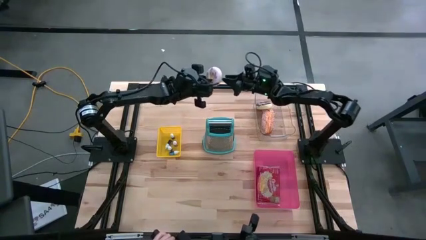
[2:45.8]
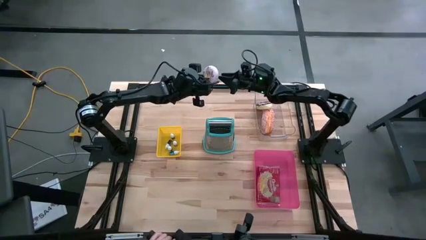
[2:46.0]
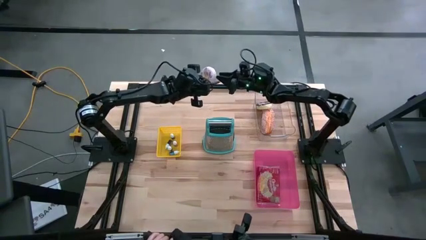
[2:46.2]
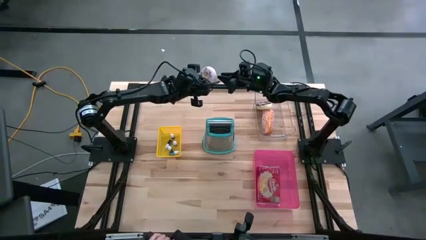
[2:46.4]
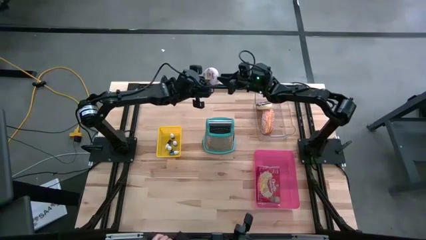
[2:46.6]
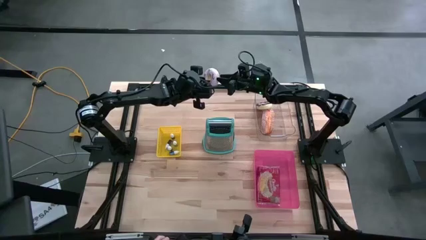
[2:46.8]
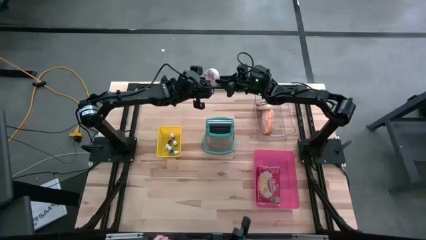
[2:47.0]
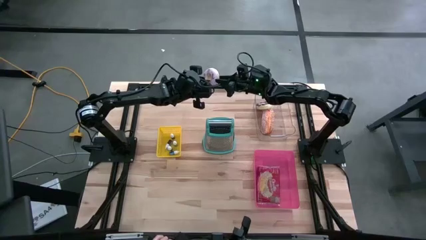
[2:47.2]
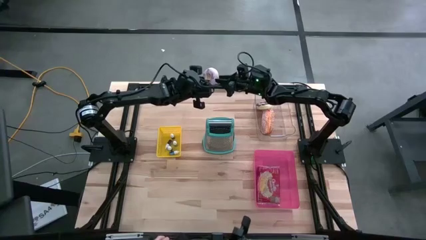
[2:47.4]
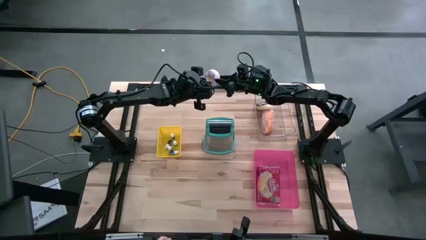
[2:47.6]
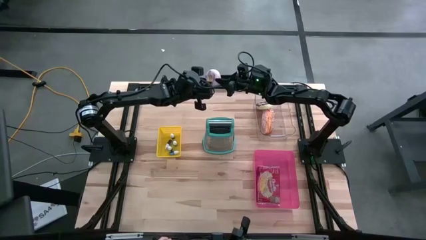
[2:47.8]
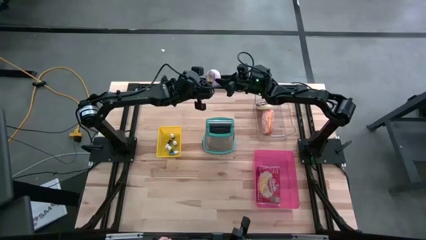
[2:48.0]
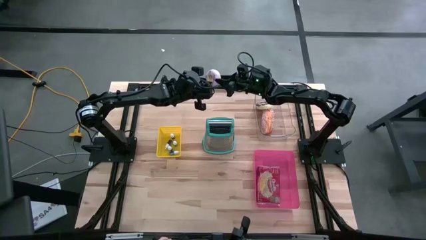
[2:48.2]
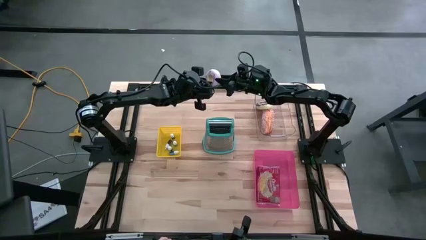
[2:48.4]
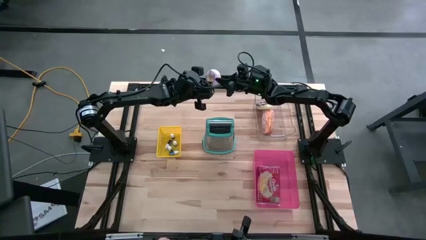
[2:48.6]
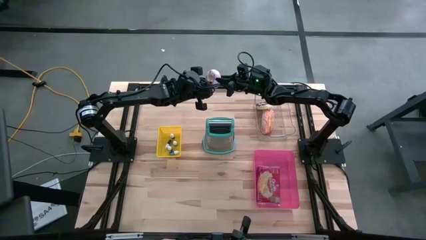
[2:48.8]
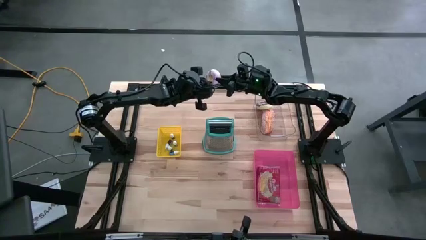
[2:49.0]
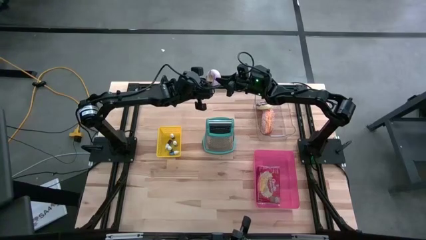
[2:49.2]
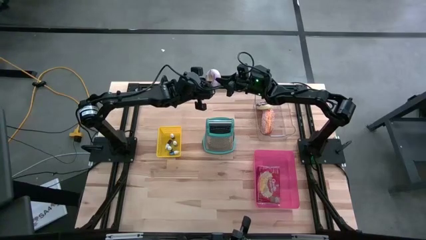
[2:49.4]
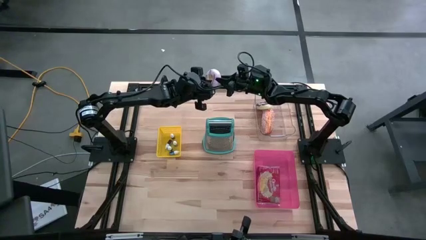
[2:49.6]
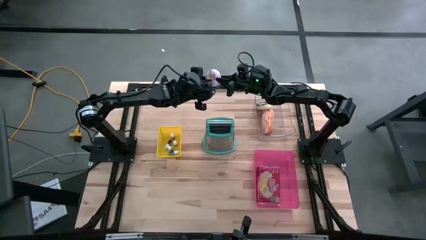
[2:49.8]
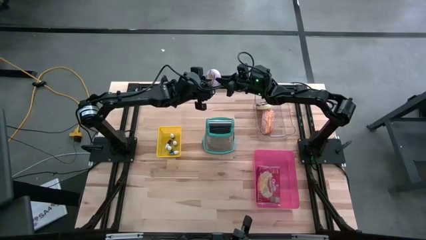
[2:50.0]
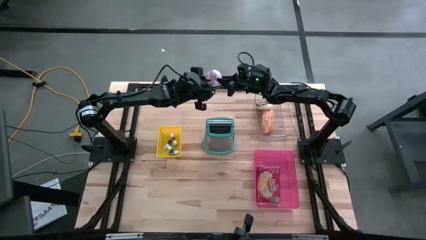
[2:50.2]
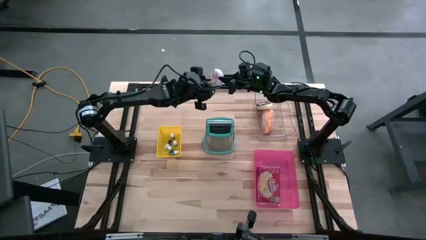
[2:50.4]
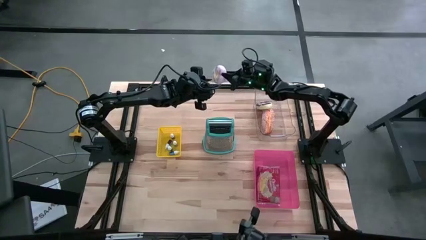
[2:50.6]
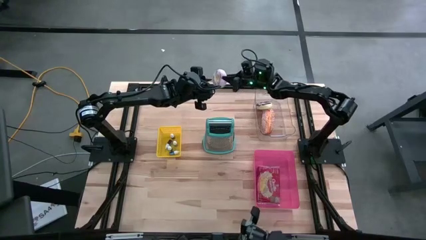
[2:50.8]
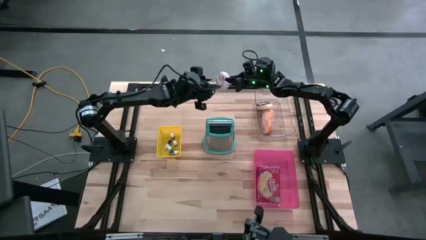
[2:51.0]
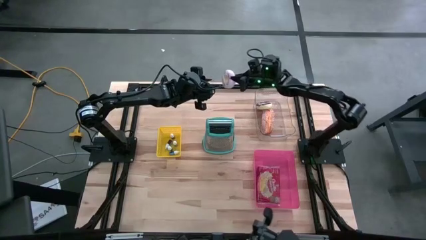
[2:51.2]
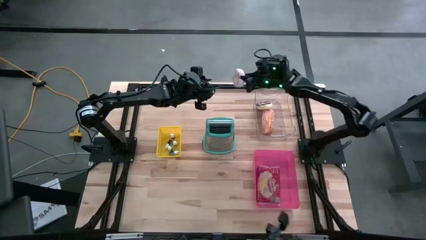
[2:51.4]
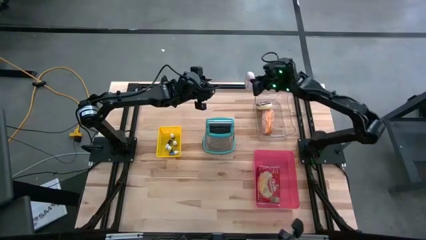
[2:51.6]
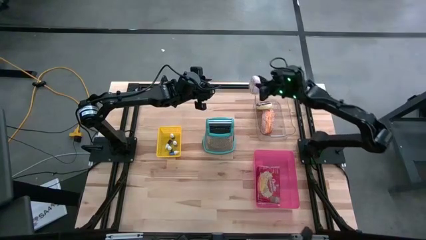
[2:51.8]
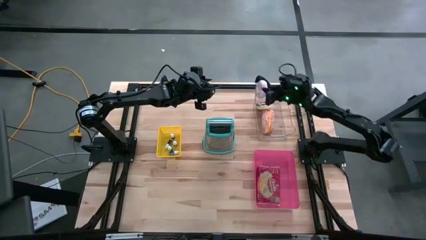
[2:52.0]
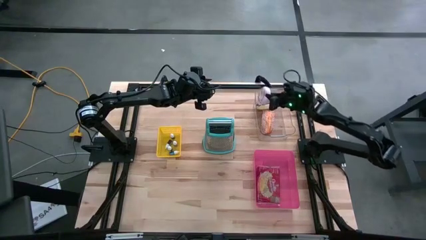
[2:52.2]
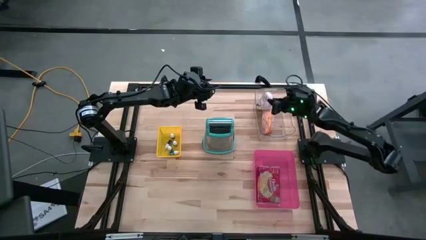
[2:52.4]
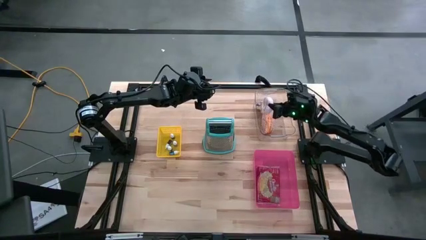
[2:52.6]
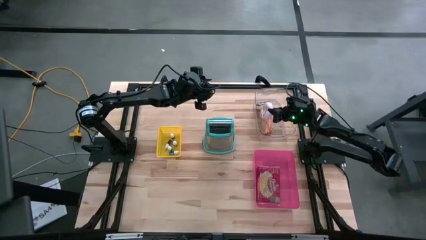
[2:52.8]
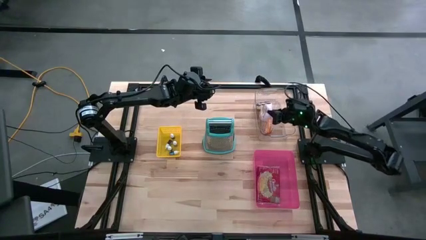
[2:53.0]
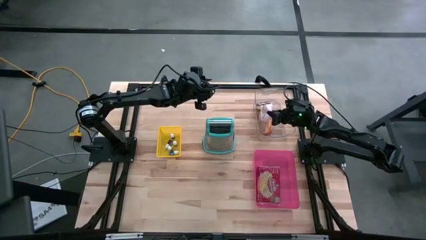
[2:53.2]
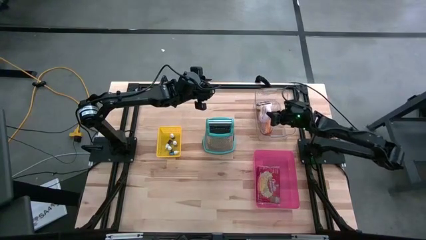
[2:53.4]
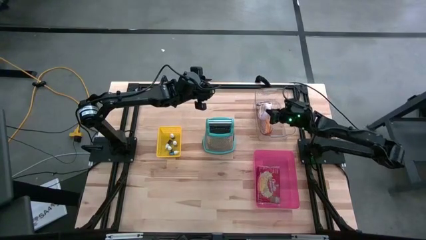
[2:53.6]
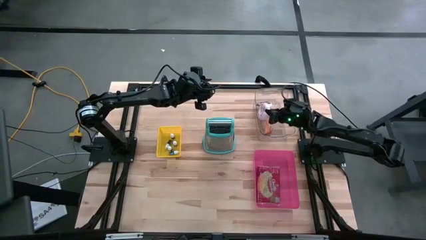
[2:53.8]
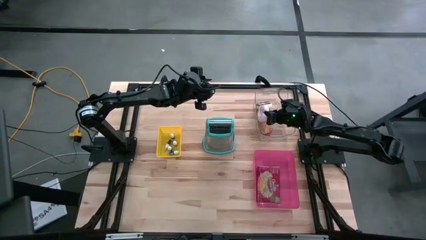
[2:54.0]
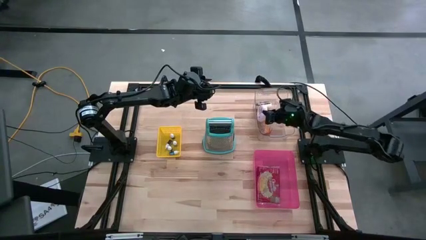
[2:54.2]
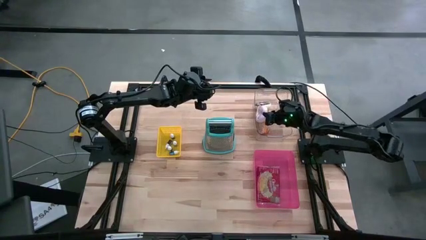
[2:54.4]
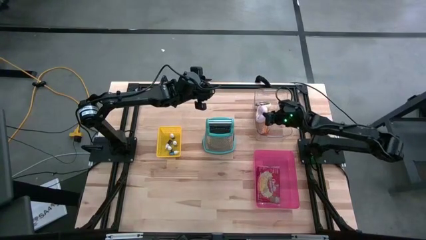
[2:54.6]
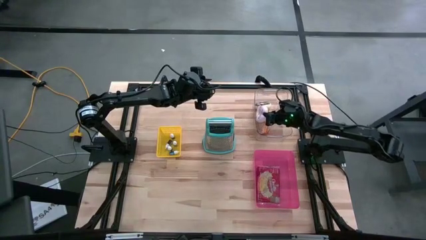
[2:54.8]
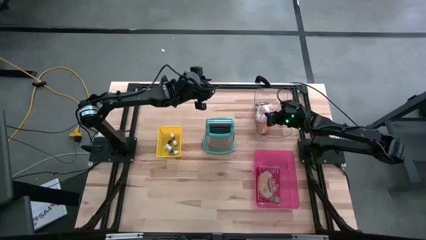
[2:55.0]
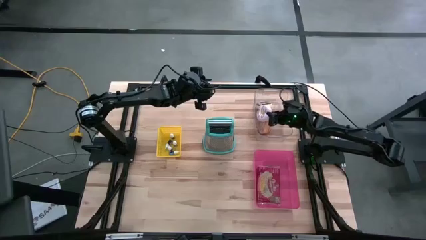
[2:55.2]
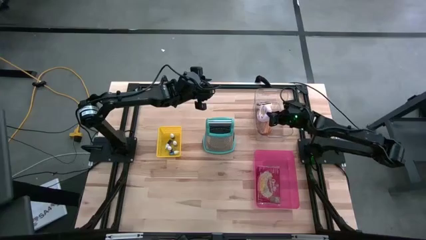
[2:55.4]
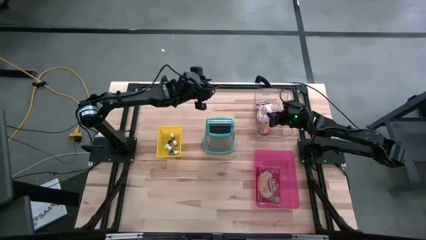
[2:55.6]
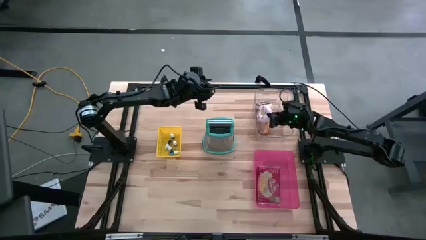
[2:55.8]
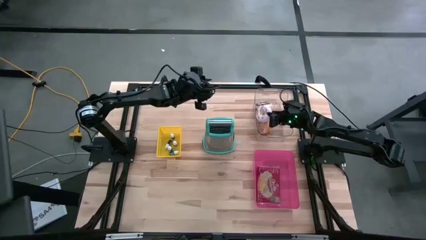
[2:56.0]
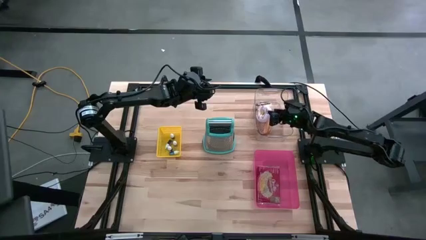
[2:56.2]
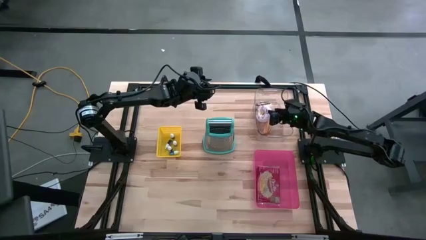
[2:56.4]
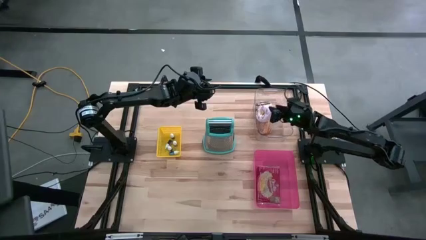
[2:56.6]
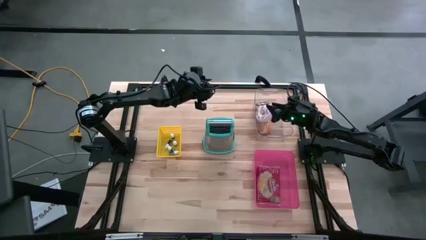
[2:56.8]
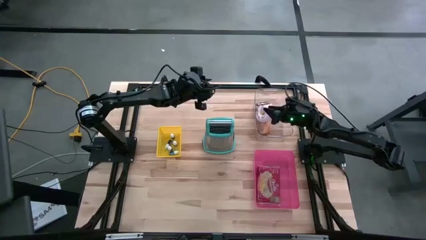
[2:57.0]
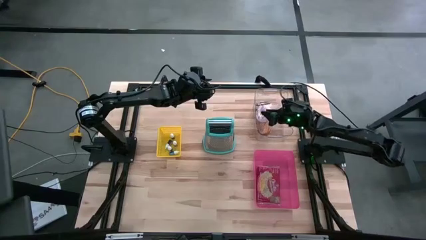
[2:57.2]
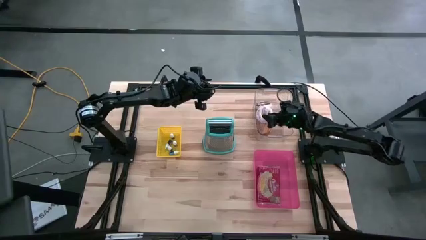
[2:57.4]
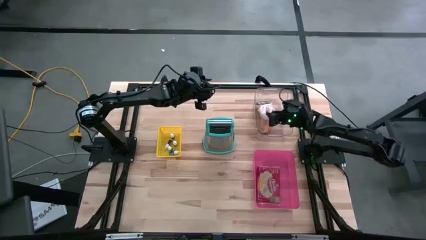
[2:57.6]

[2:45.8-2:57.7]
Put the purple donut into the transparent bin
